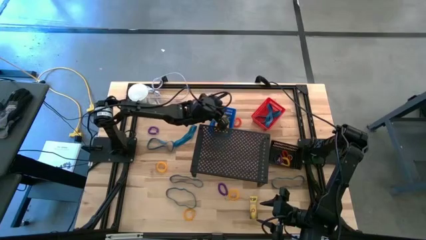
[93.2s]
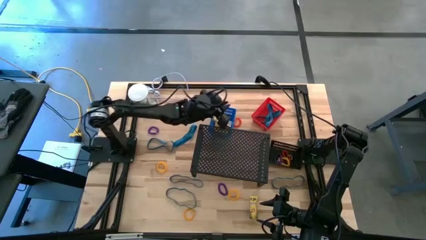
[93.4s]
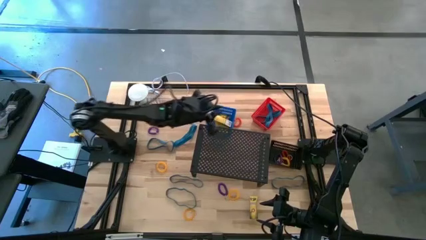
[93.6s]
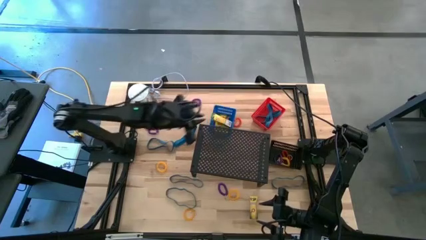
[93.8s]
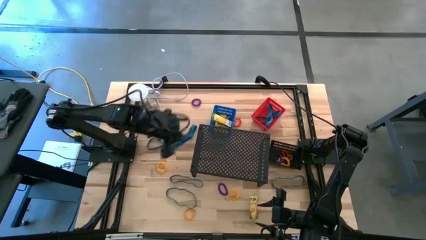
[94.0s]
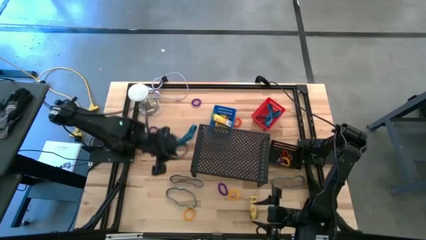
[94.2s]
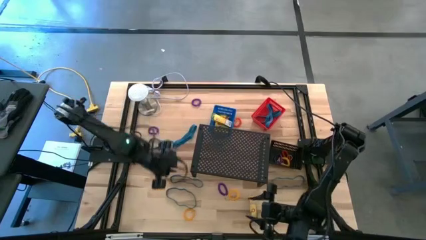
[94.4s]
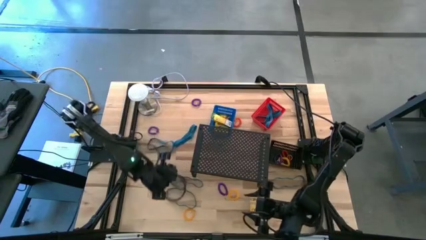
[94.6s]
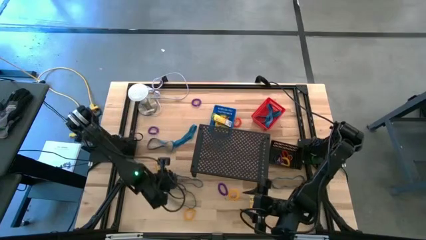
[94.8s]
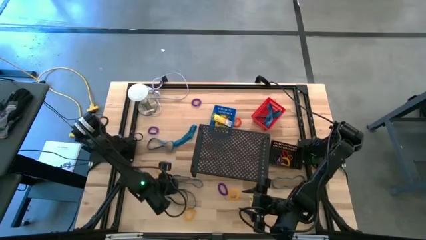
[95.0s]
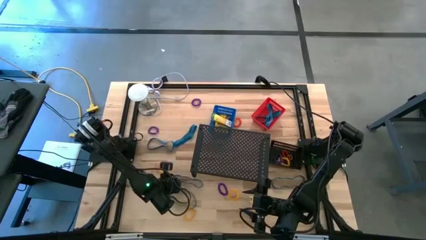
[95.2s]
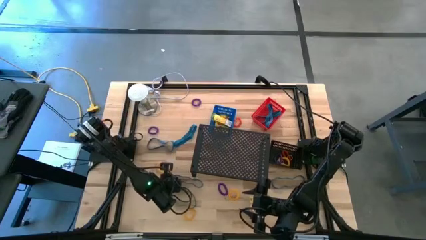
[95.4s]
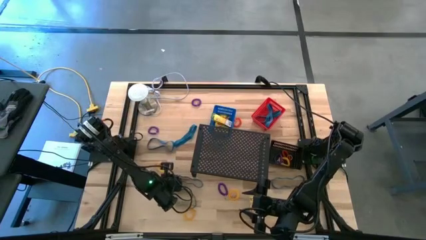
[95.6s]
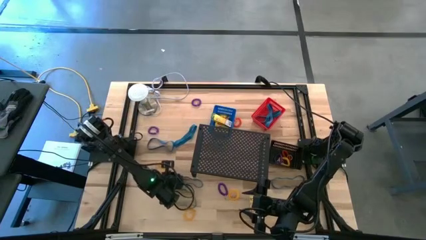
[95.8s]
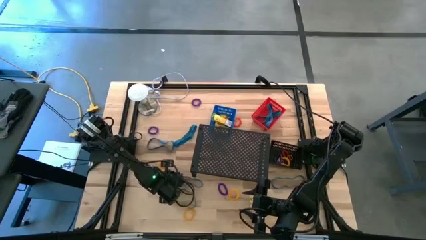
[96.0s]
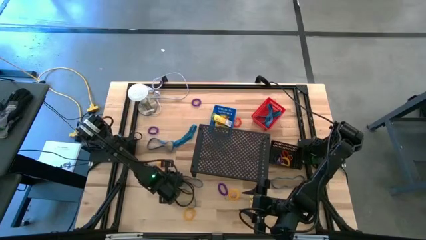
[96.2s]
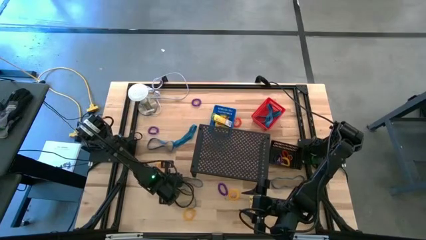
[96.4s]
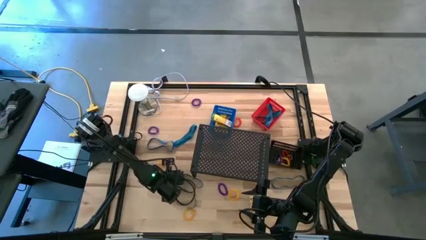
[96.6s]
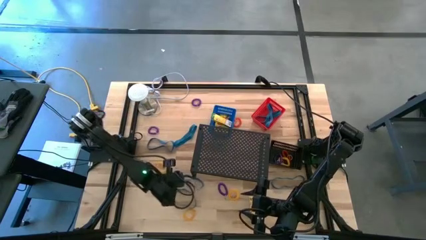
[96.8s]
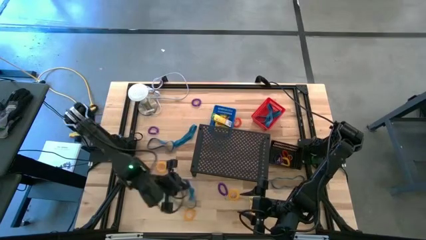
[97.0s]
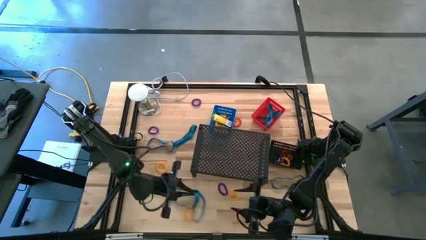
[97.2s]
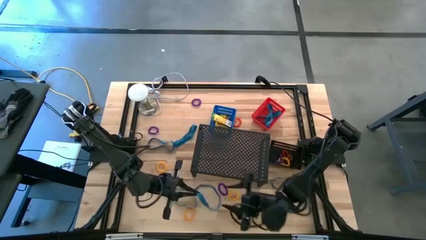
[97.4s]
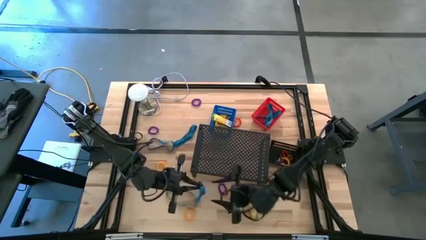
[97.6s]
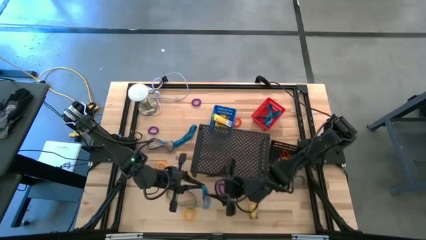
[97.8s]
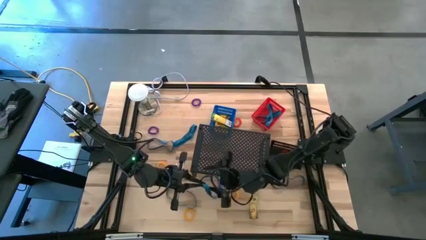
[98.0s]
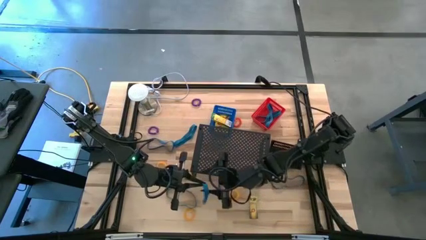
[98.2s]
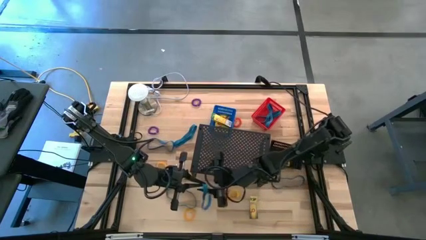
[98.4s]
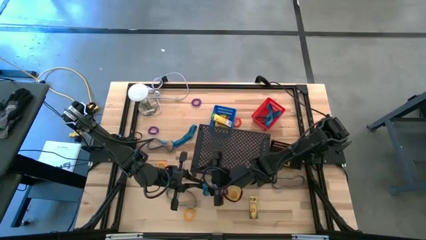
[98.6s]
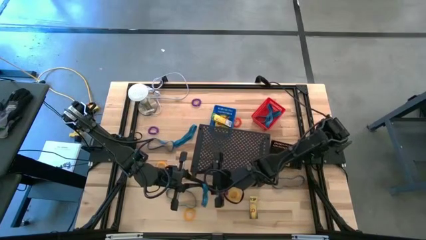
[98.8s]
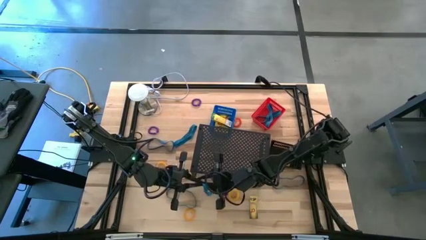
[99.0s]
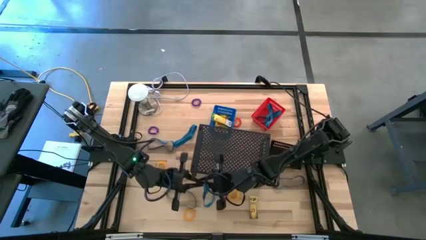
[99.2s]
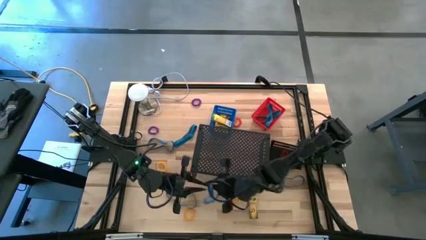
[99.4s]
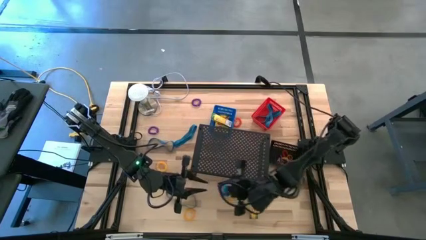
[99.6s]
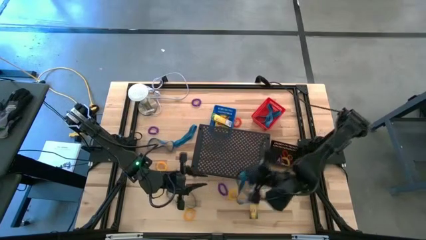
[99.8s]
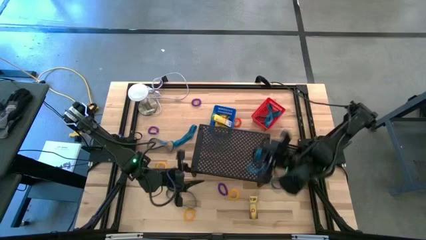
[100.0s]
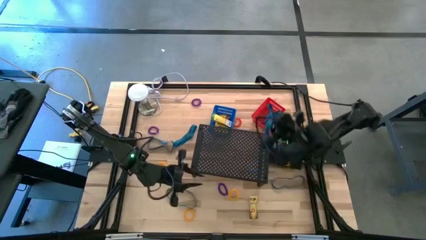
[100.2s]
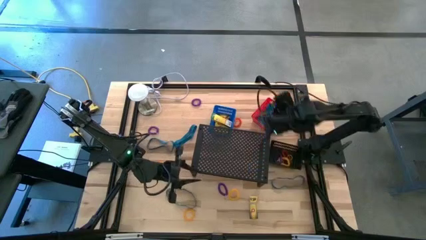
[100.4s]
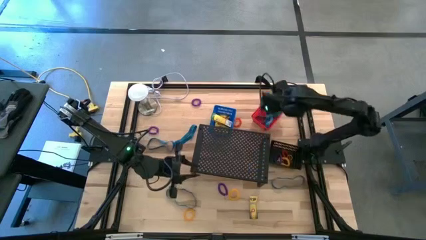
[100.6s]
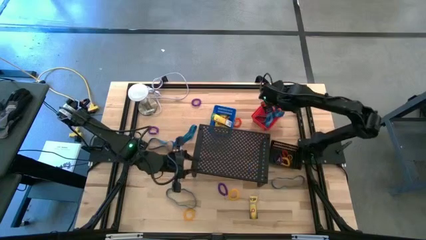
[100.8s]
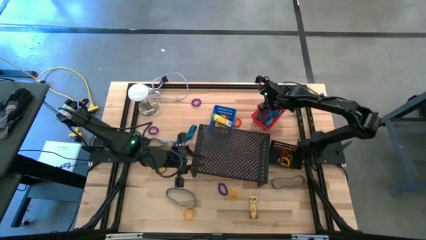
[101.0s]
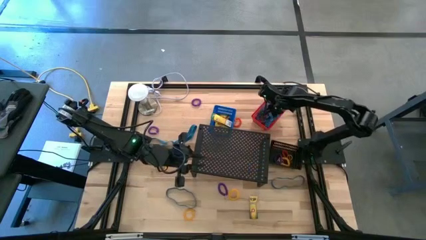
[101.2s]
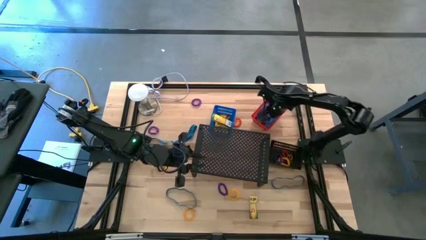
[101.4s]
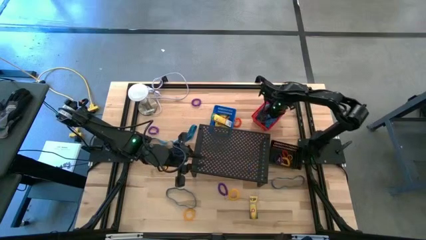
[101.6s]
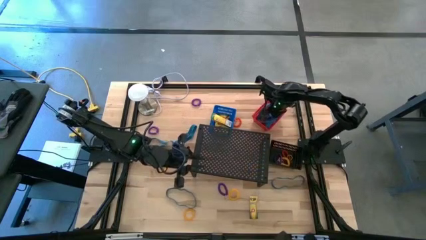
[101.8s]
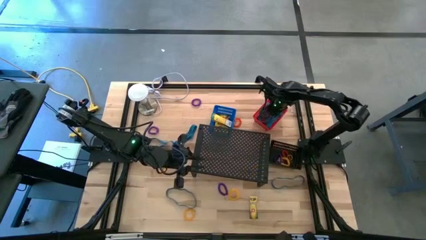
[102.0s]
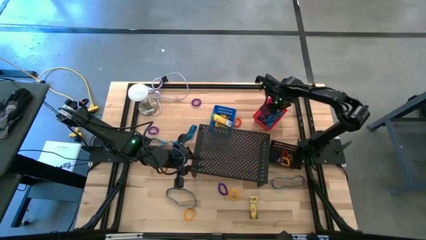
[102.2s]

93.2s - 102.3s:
Task: Pick & Place Office Desk Supplies
Put the blue rubber band into the red bin

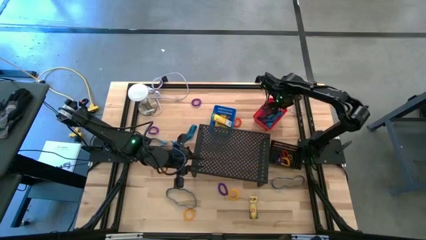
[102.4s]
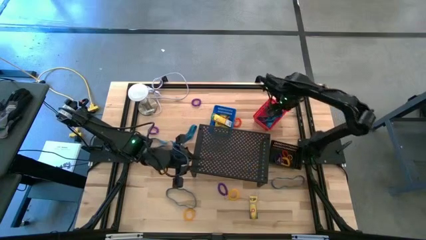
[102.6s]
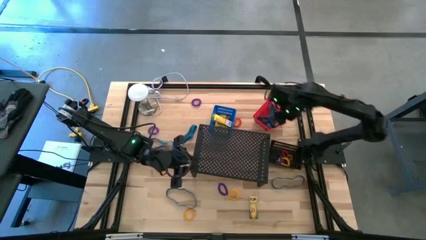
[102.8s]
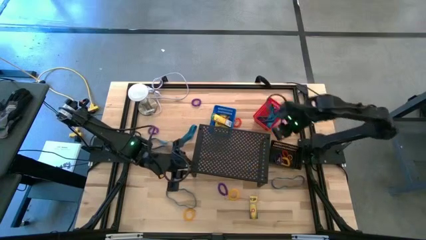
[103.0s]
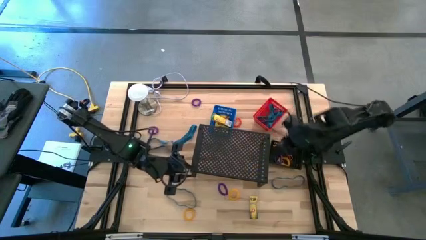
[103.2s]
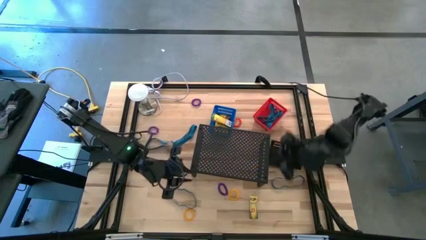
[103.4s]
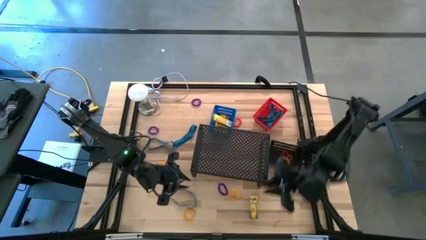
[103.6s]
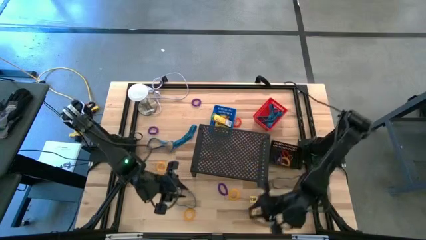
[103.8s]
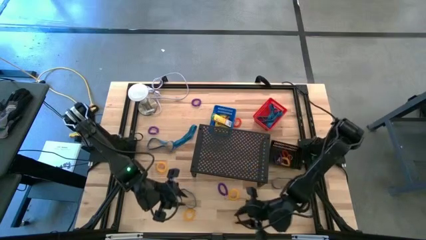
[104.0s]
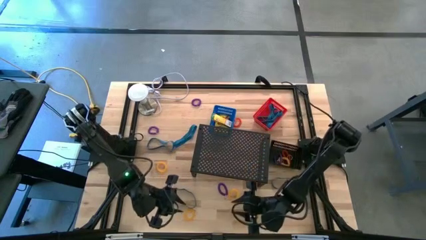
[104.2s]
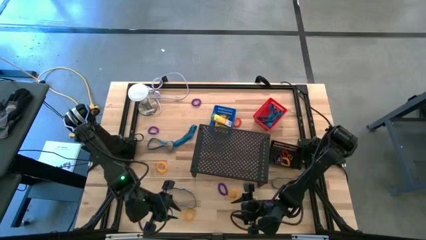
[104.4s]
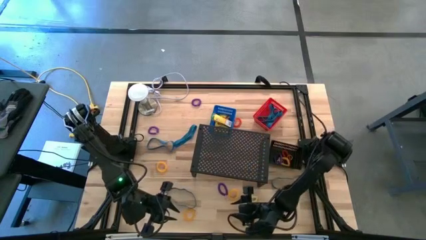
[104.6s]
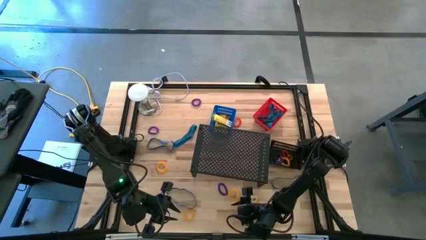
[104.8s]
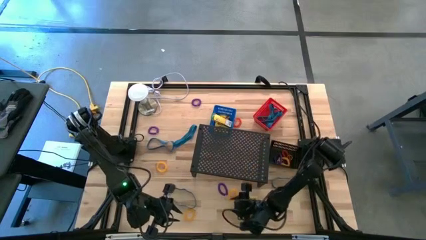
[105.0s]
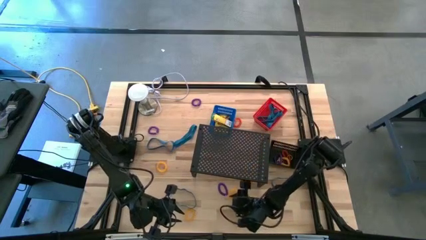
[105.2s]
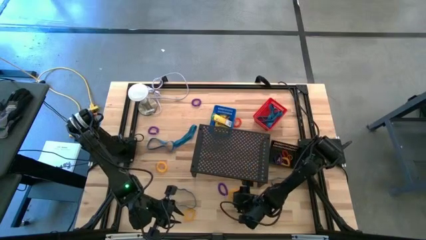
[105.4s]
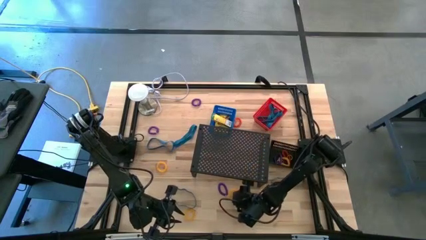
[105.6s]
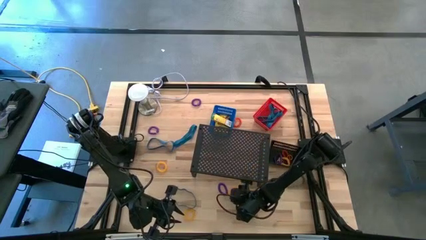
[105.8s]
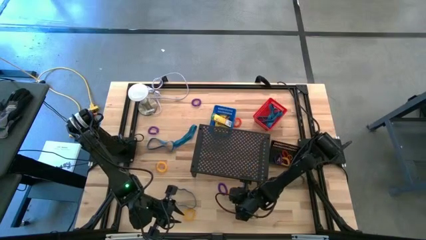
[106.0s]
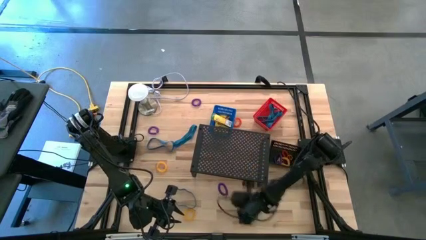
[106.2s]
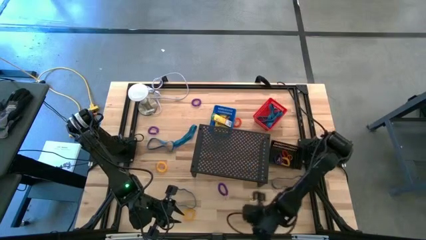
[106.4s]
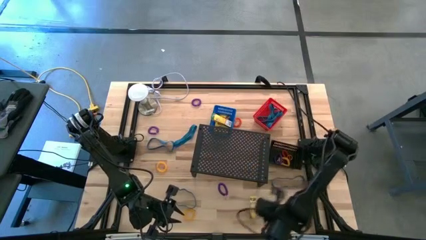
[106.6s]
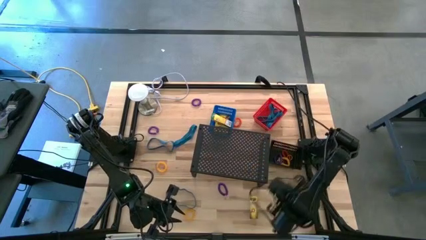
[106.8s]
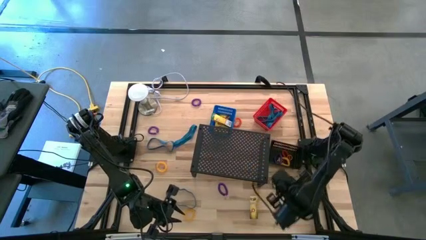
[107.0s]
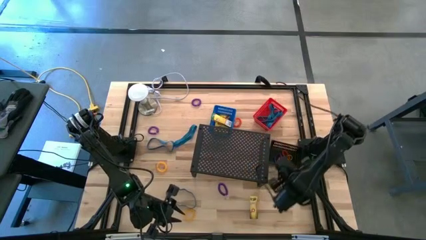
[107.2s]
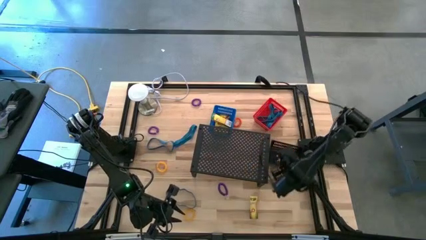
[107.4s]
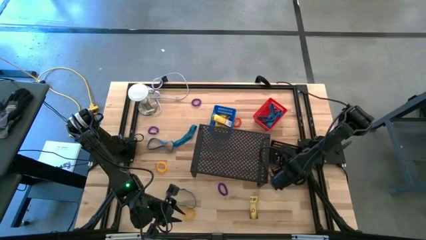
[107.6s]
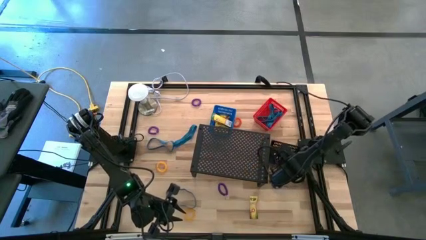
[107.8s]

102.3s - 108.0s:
Put the yellow spiral keychain into the black bin

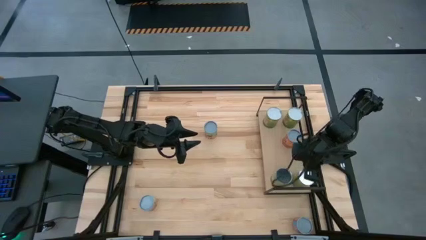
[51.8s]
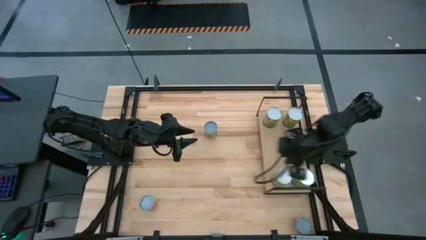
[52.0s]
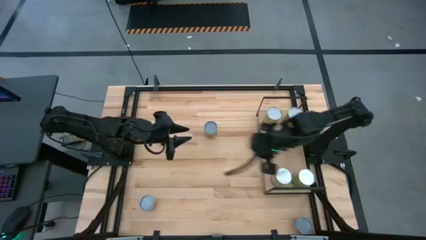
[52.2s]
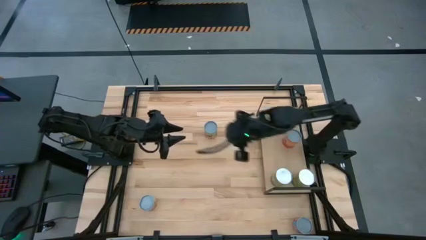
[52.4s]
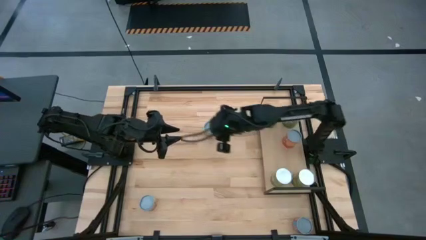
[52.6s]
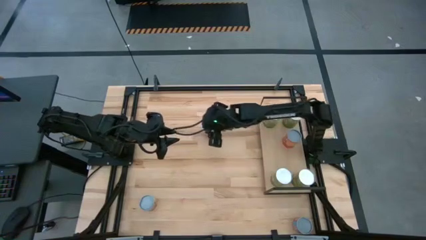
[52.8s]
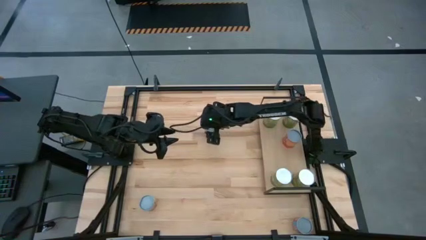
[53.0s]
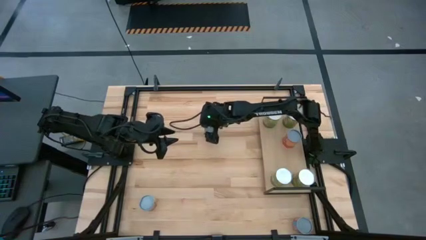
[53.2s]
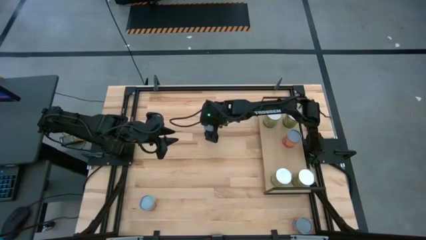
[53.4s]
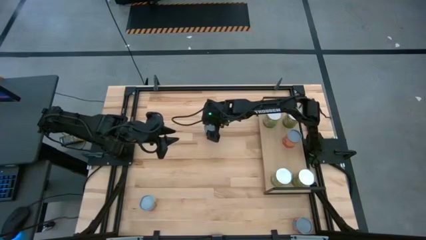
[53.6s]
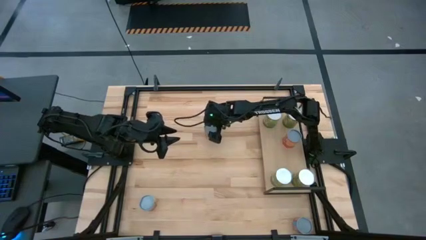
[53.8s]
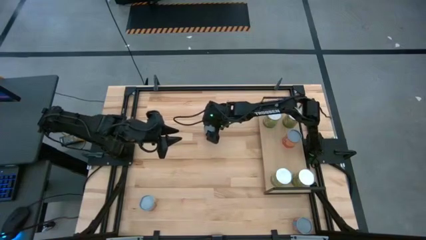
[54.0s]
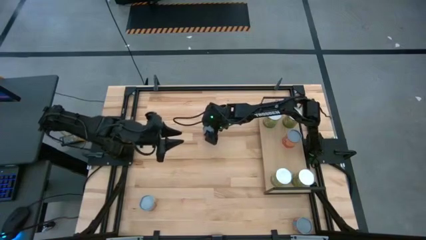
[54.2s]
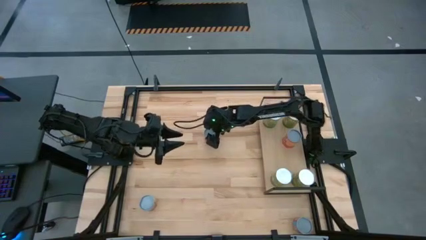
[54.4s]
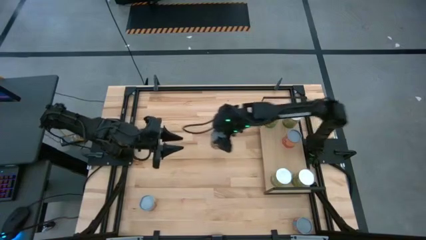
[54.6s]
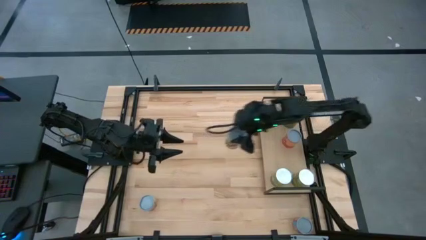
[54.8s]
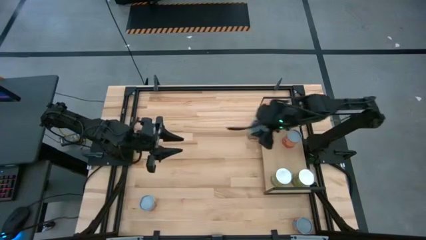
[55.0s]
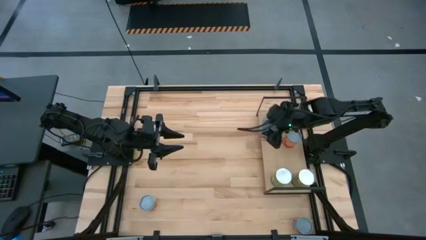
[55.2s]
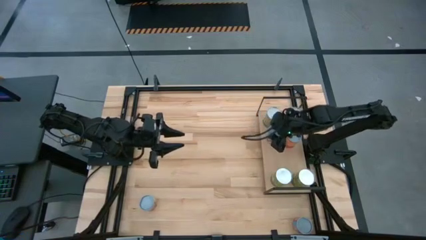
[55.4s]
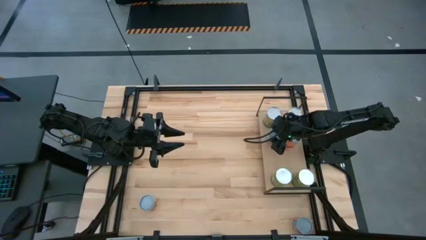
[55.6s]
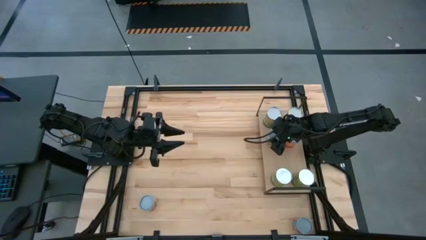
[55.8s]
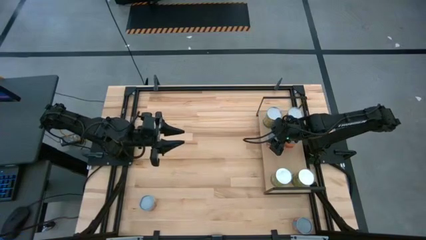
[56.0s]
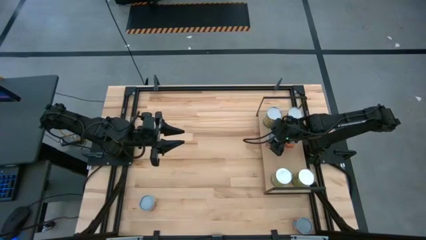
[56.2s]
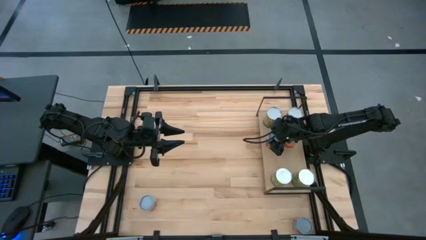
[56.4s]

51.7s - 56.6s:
Task: Pick and place cans onto a shelf
Put the canned spaghetti sauce on the shelf
